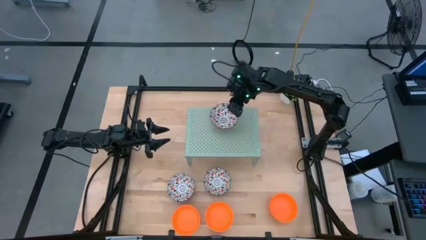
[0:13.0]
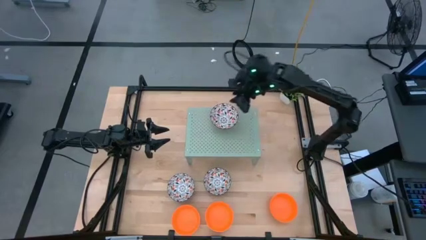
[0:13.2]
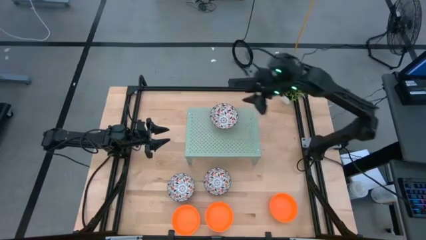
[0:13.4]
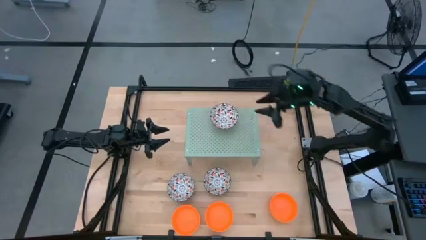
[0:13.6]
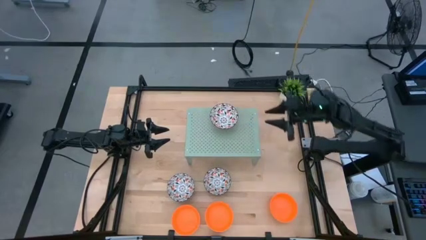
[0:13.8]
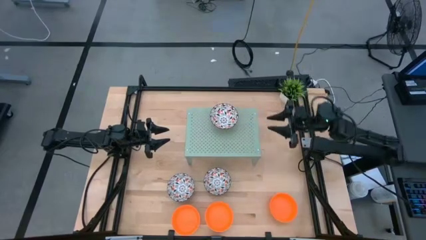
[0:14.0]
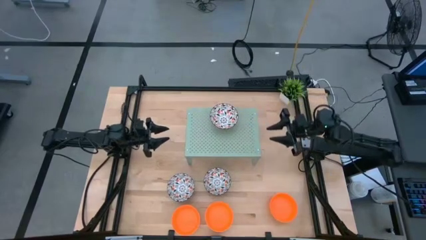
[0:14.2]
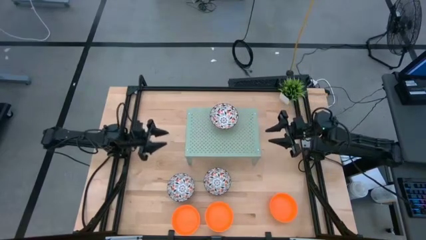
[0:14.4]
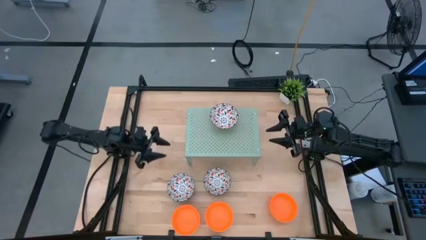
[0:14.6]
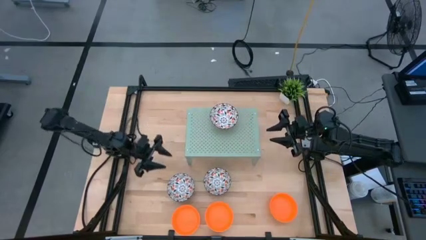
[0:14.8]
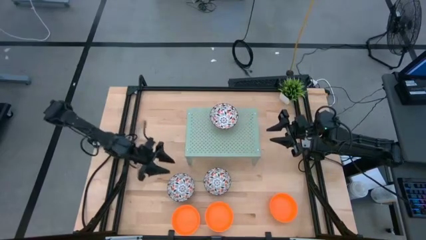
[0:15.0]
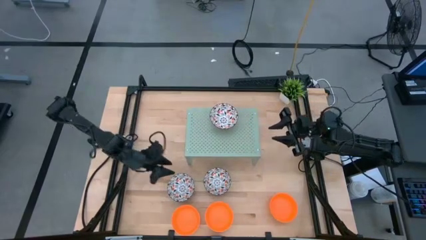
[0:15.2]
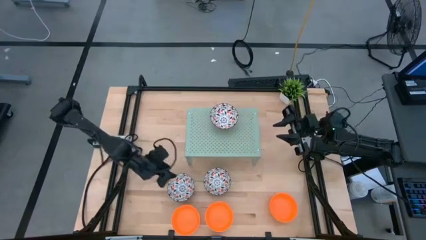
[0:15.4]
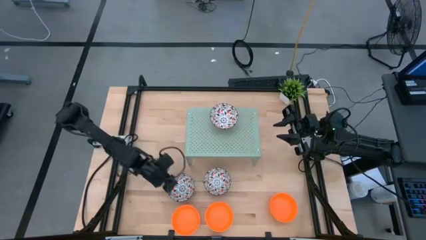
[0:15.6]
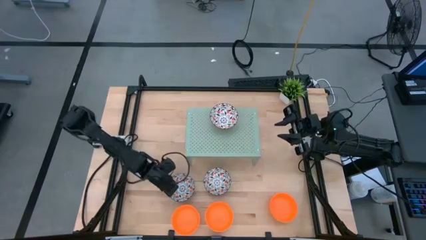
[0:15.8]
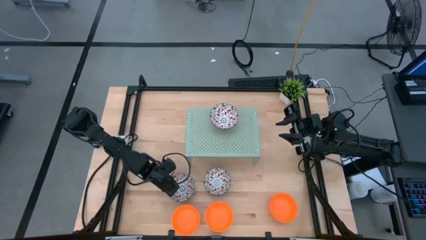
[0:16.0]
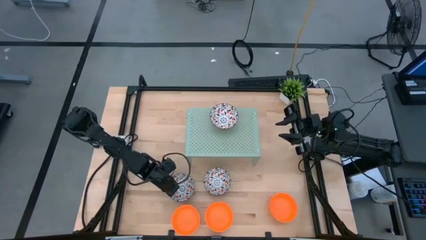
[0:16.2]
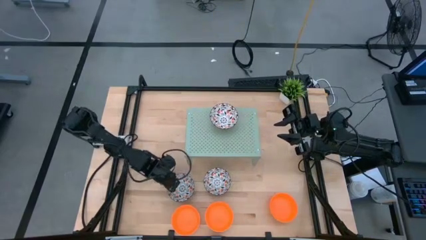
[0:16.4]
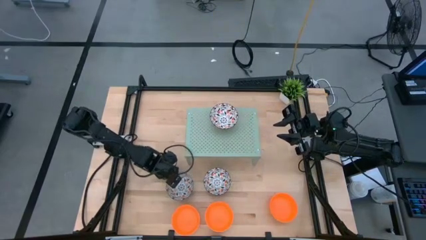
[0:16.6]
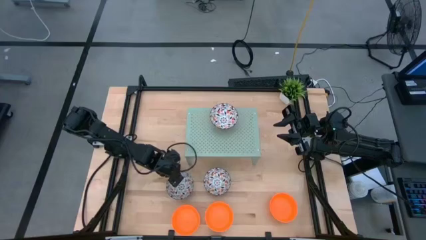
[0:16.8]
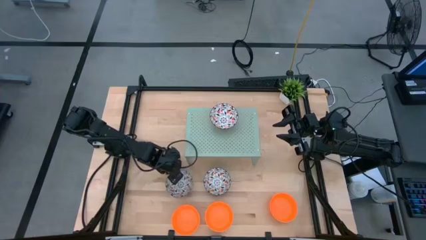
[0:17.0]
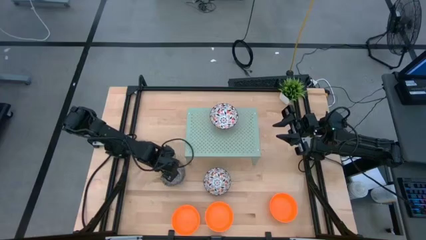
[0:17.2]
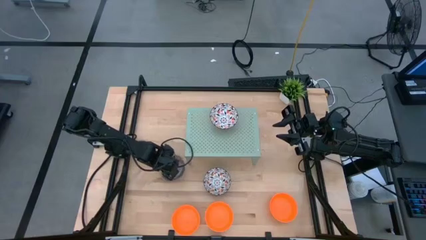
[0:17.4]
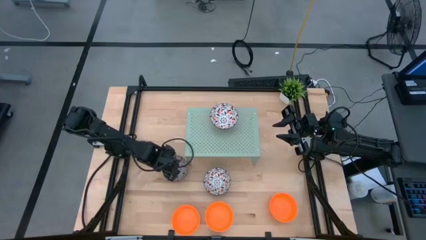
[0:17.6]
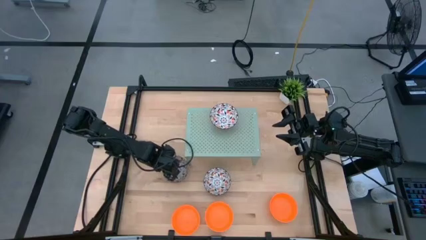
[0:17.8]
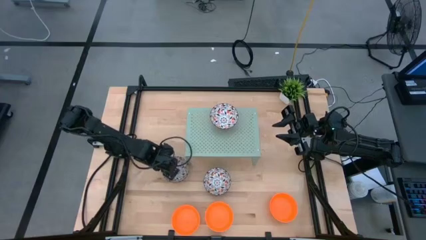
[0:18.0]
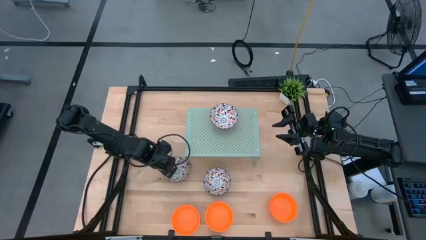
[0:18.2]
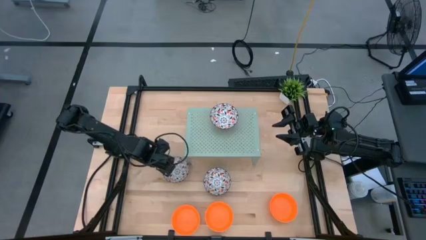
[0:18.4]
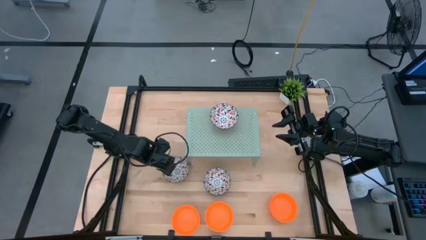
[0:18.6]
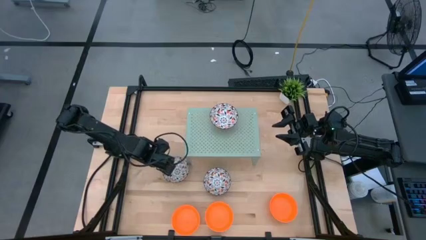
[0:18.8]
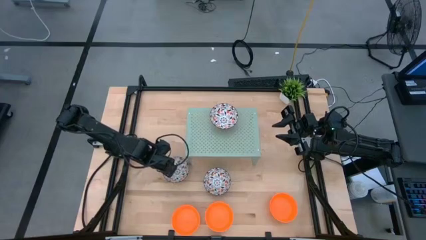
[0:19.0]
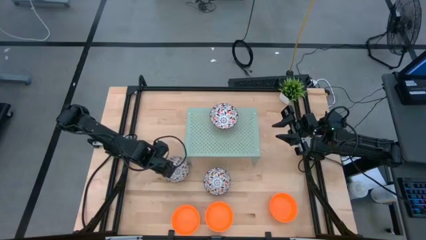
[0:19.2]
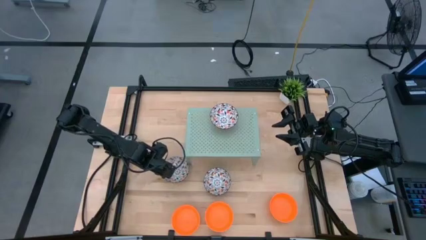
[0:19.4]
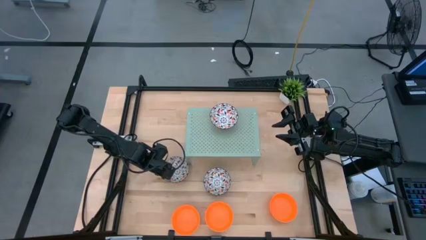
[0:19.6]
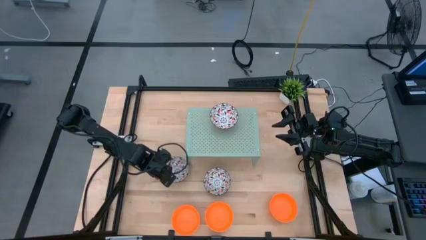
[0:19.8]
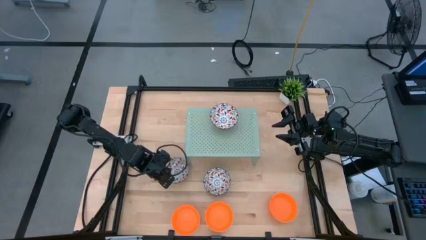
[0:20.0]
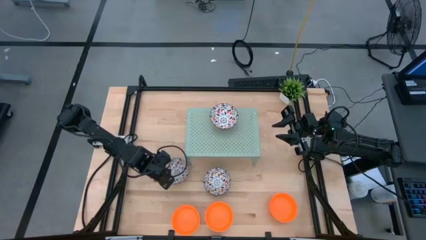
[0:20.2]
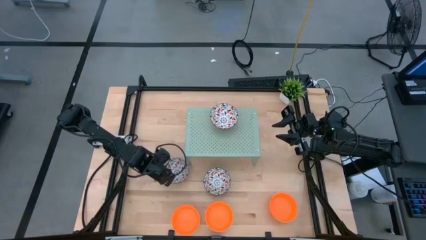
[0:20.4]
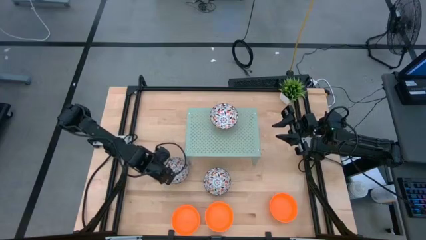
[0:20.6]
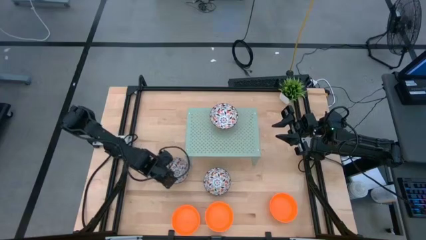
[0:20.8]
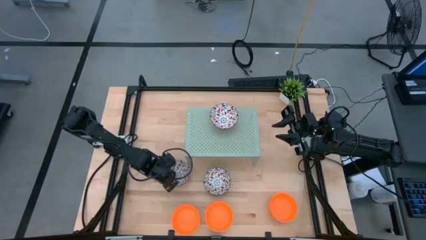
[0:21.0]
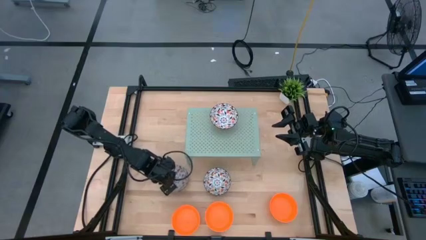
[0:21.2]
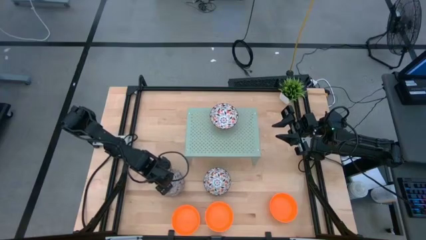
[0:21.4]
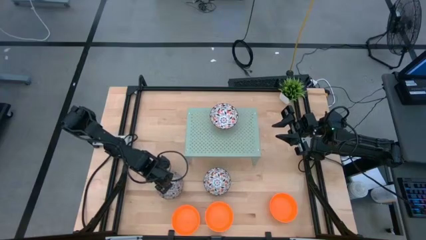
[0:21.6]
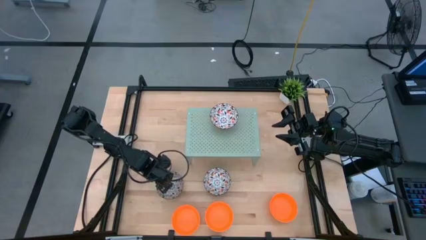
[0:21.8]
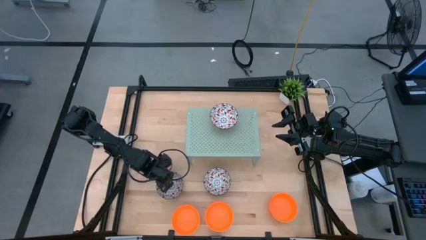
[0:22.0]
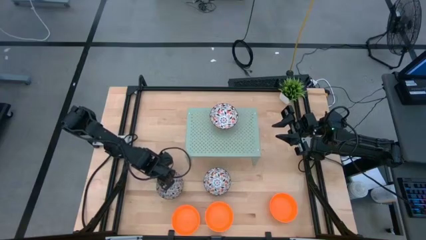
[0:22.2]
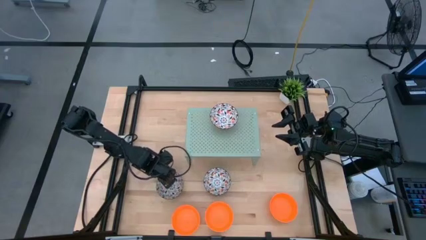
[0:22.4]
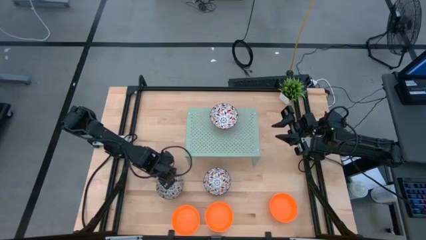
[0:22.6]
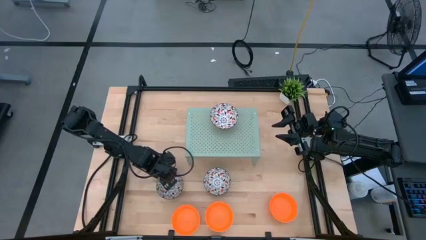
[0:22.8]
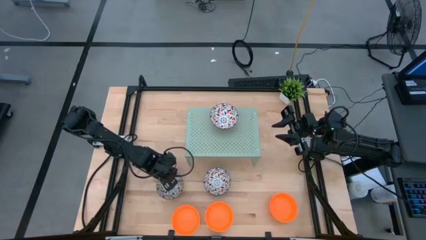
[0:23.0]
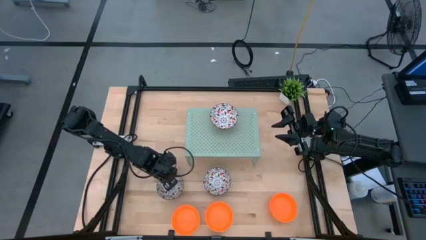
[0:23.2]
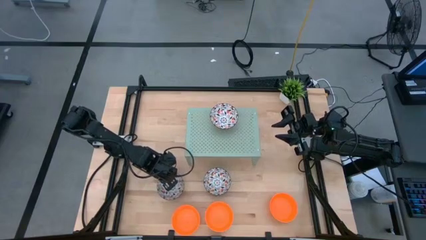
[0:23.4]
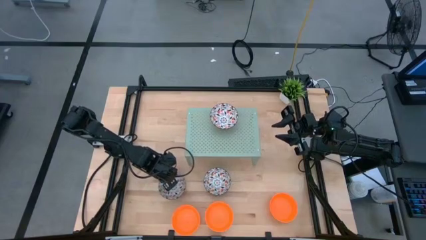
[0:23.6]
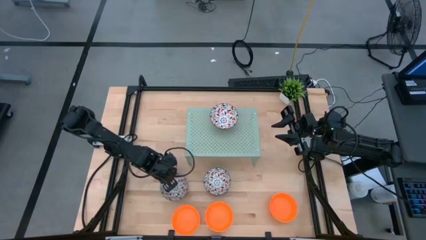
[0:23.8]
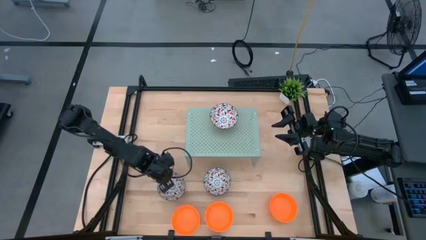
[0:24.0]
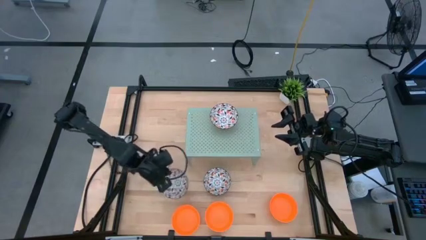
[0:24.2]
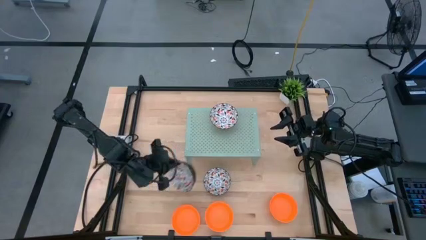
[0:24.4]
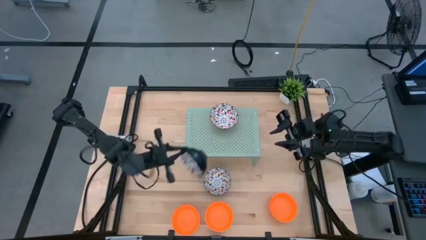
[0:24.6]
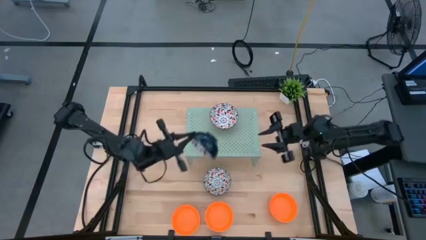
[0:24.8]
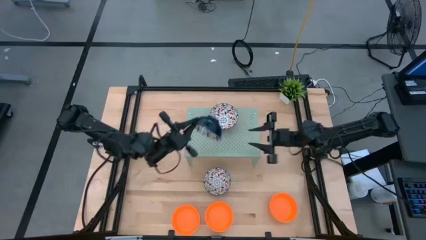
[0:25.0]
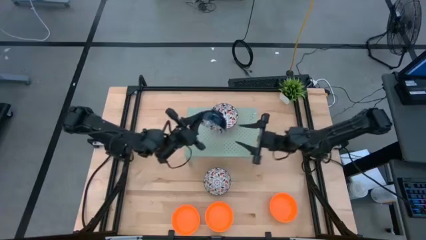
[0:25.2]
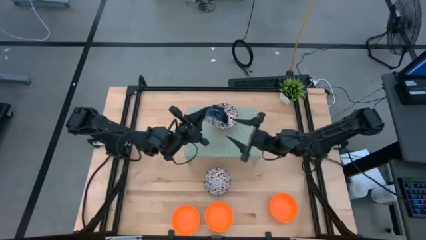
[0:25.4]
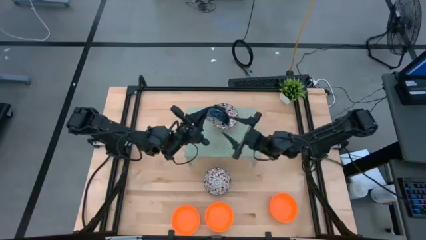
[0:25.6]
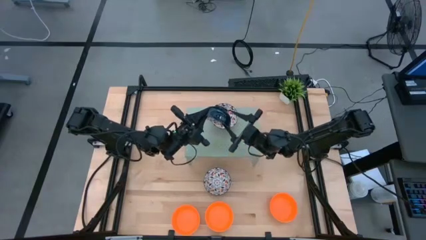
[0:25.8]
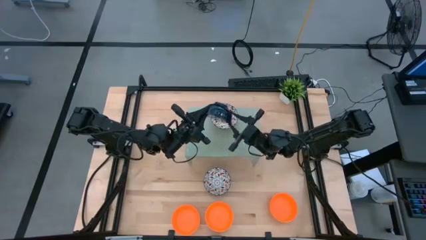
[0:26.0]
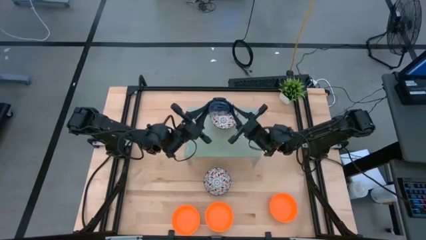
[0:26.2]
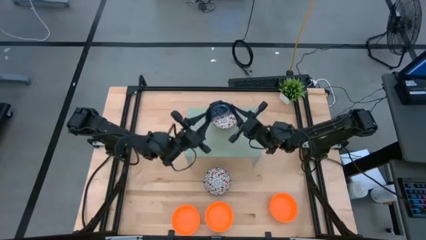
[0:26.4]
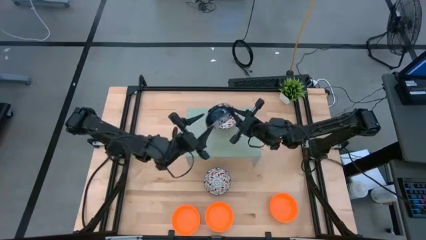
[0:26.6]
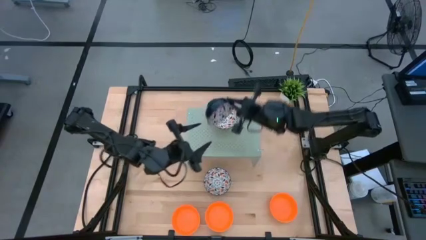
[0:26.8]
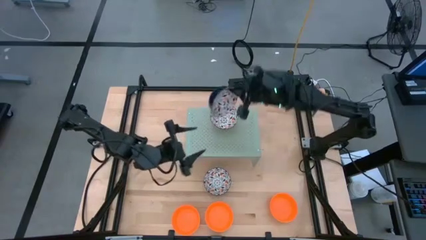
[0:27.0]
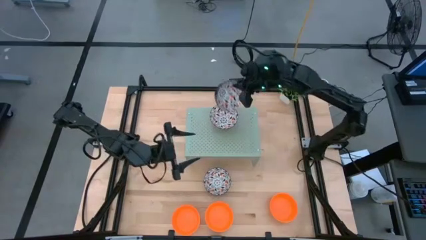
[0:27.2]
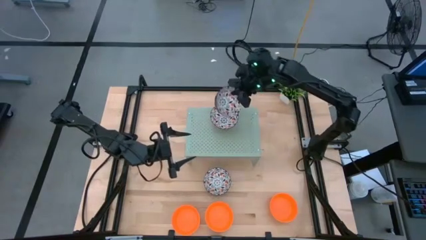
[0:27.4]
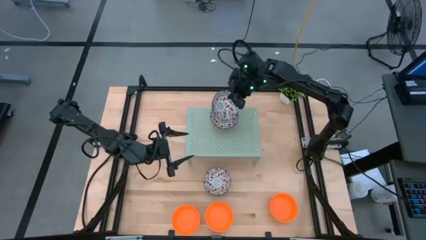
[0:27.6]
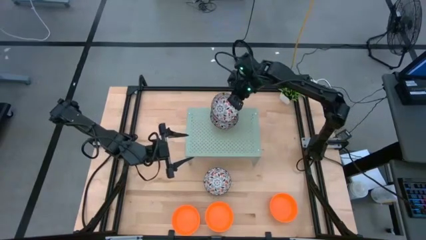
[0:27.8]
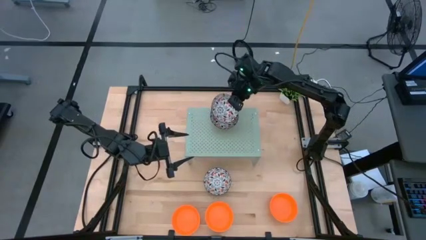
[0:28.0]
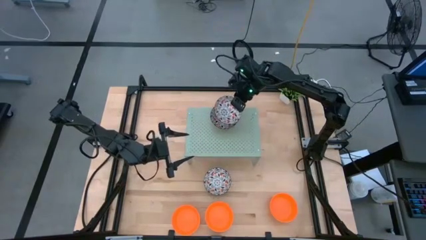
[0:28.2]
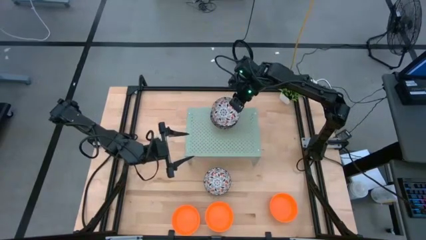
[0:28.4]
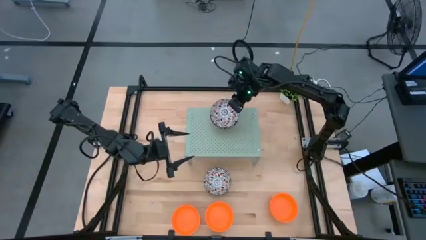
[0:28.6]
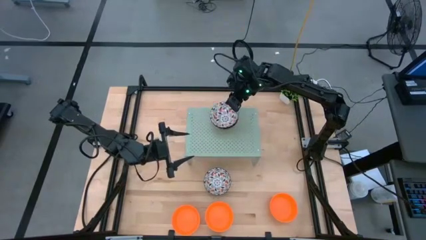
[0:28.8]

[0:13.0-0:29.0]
Task: Pick & Place Mini bowls
Stack the left white patterned bowl on top of the white patterned bowl on the shelf
